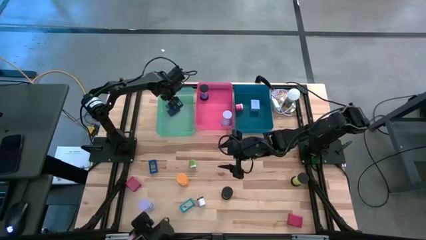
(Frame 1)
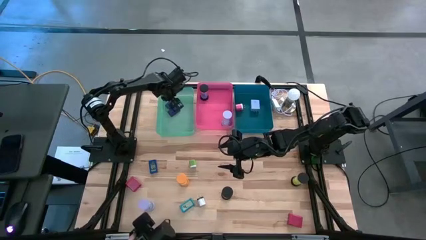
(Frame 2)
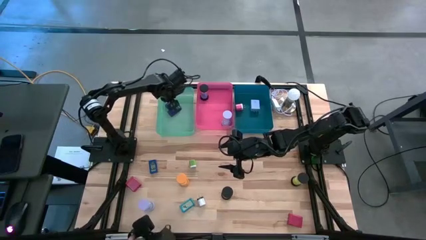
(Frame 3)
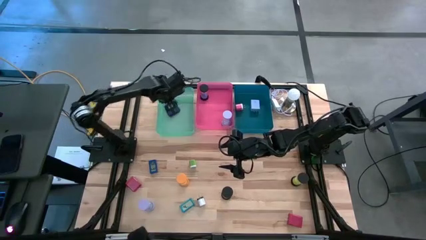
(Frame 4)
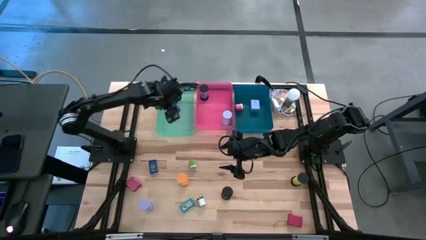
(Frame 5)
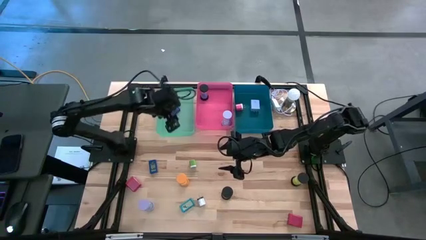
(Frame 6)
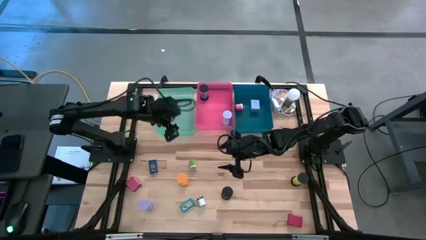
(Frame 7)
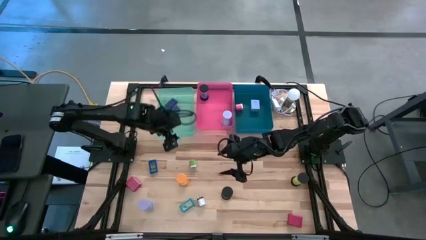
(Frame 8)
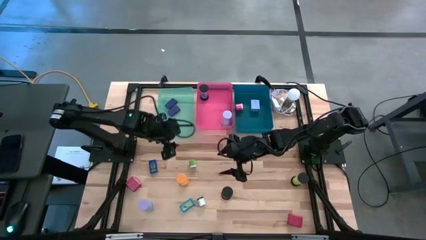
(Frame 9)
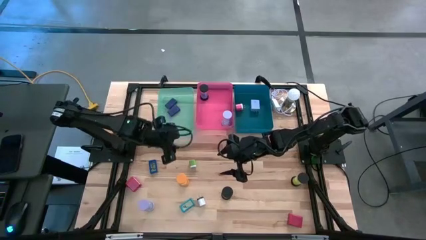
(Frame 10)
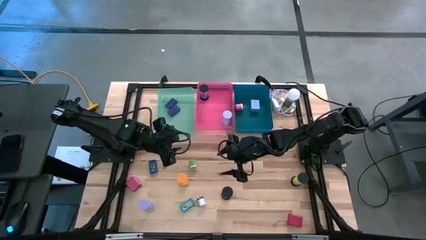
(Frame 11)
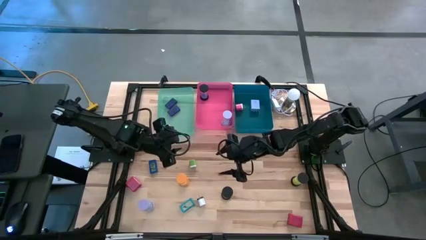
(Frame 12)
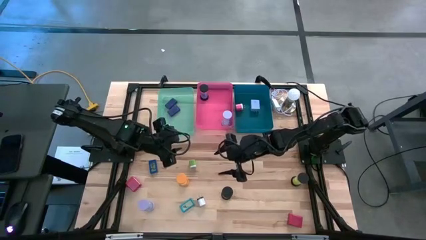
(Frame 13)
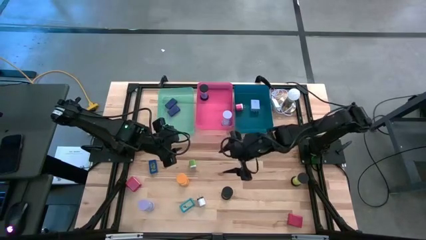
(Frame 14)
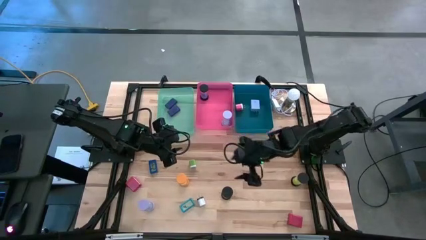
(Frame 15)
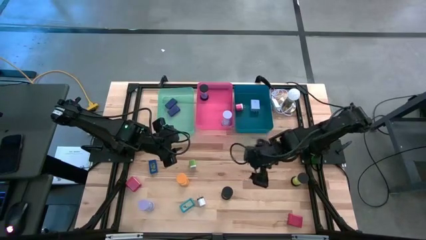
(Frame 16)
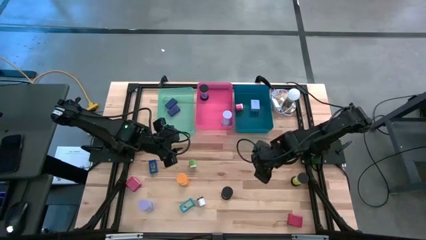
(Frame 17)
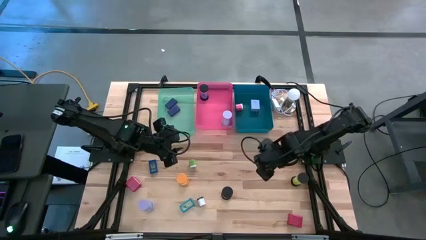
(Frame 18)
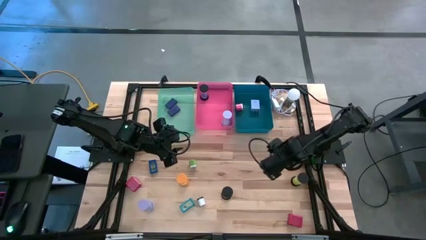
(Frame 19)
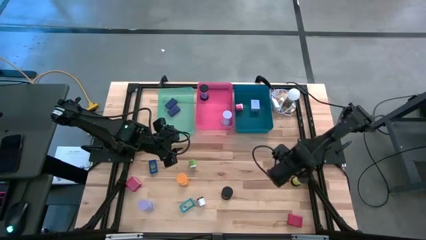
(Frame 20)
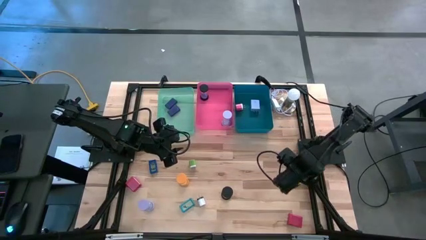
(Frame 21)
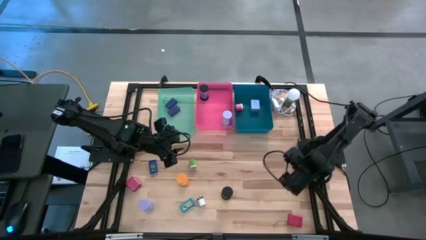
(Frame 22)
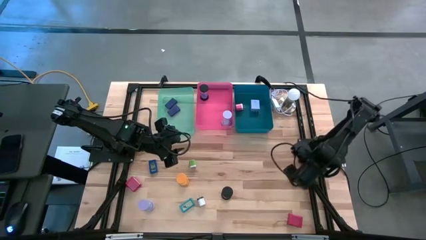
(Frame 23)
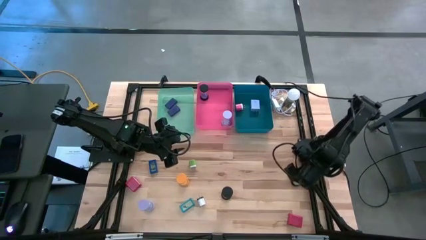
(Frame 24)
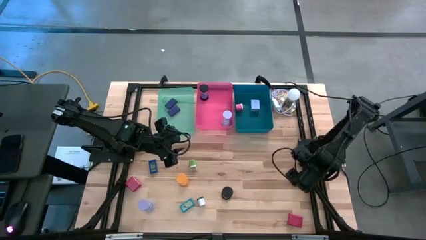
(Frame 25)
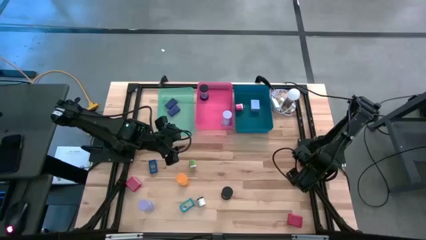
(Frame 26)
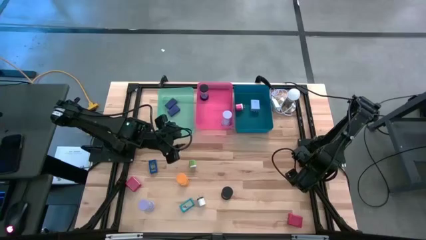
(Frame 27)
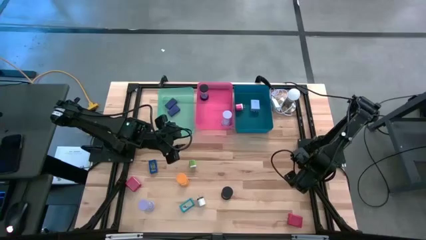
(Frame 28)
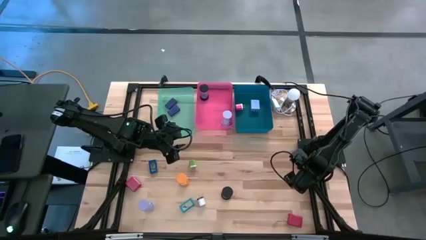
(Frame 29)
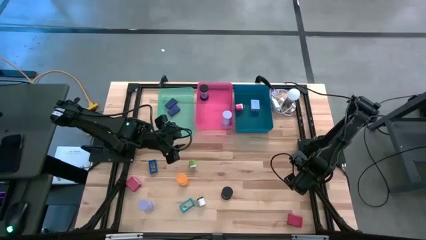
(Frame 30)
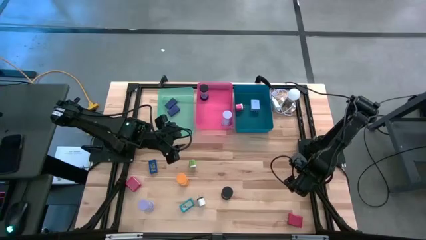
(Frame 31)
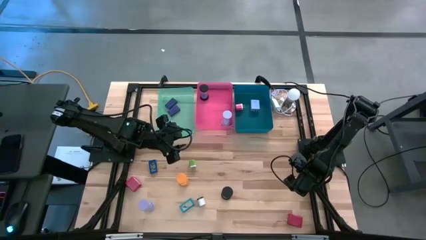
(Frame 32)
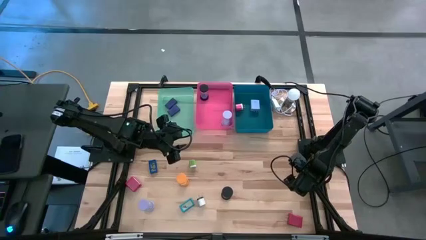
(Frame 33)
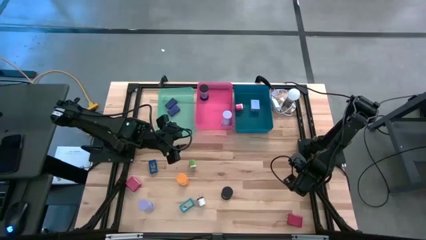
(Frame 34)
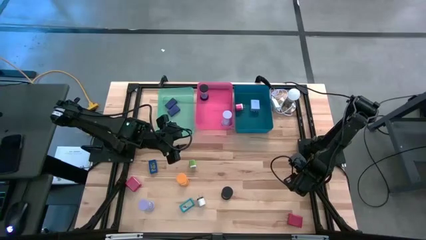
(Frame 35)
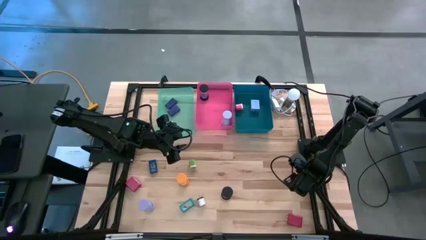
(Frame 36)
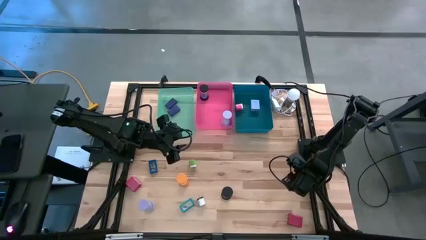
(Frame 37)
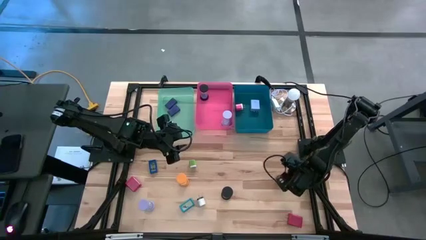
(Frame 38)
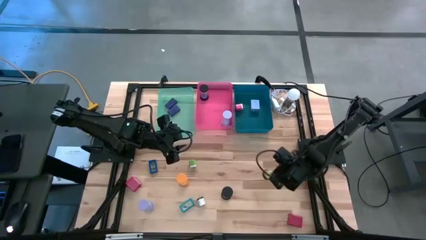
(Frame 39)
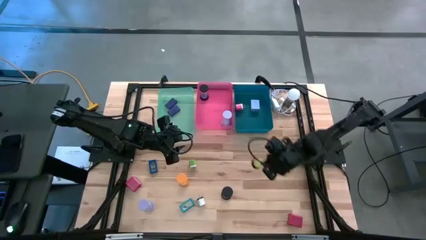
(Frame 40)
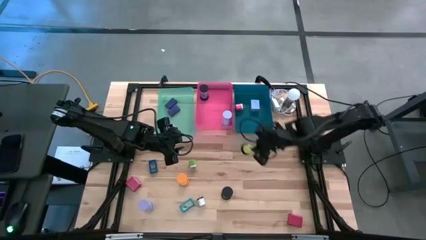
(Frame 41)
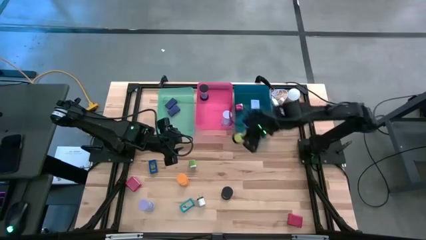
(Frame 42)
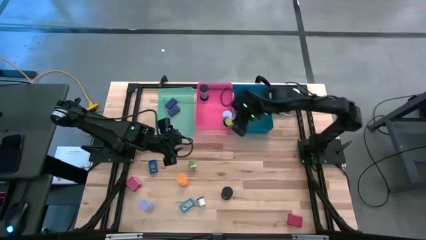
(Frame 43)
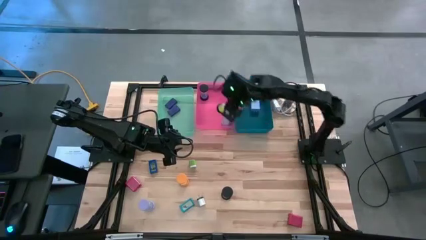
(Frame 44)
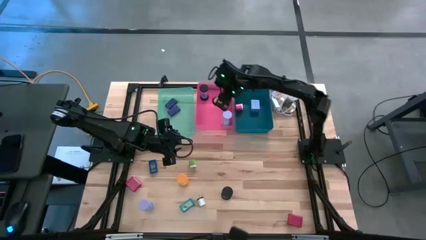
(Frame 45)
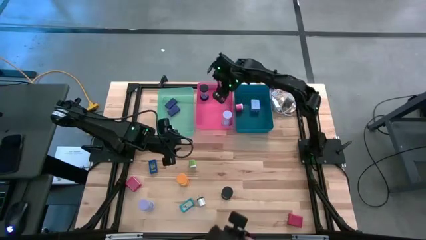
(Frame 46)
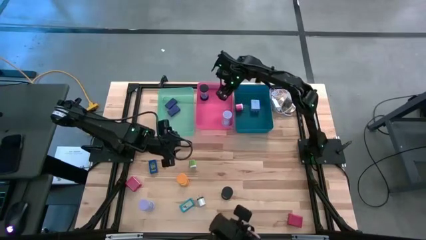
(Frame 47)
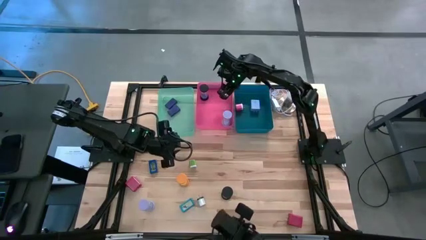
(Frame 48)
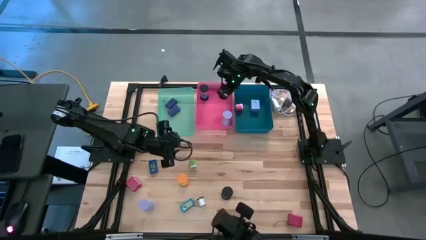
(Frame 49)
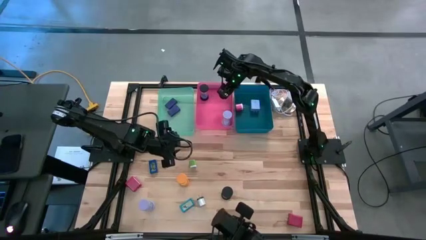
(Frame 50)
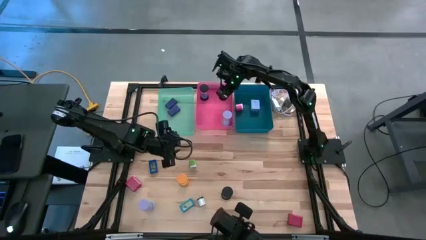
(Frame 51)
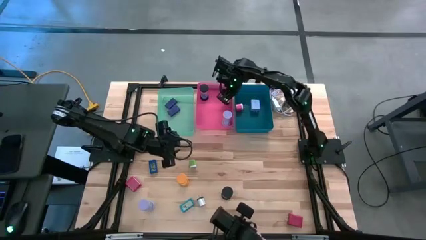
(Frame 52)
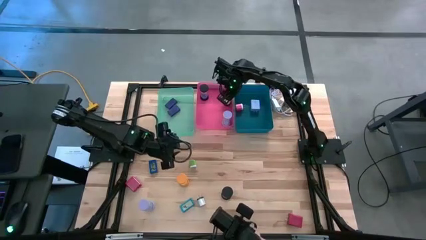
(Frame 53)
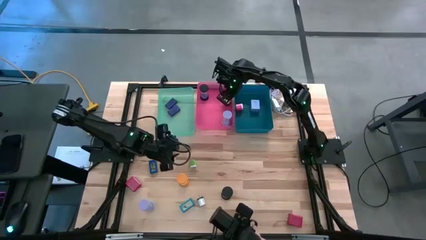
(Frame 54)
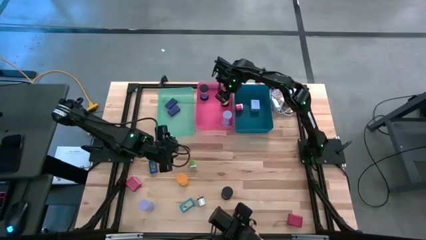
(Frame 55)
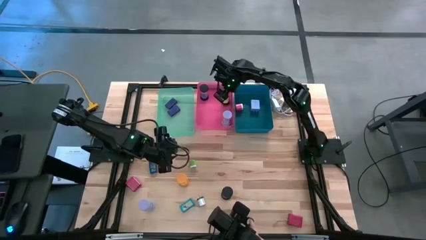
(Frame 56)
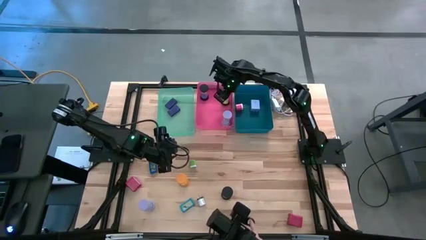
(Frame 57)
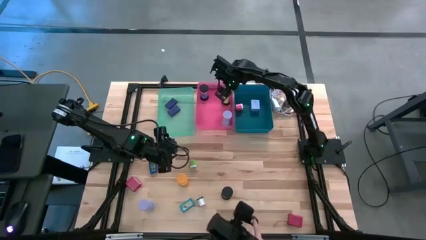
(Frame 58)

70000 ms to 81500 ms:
Task: Pick & Place Office items
Put the green hourglass into the pink bin

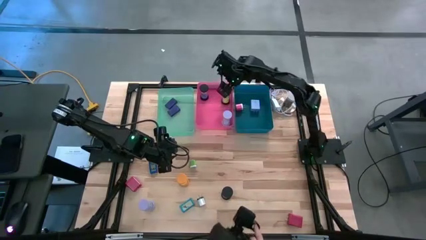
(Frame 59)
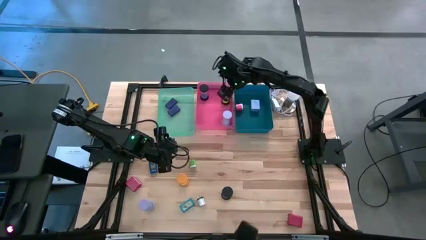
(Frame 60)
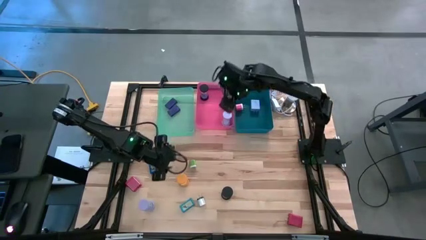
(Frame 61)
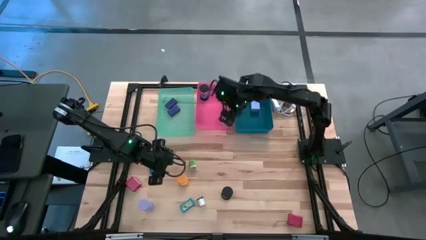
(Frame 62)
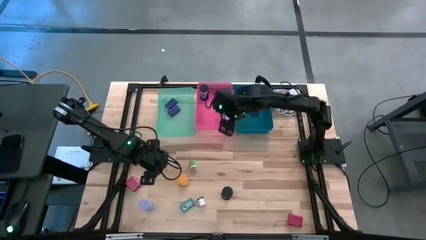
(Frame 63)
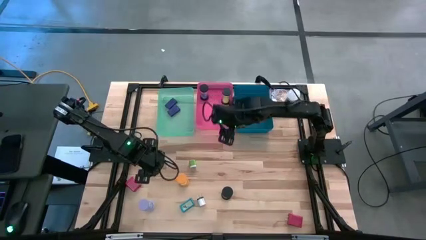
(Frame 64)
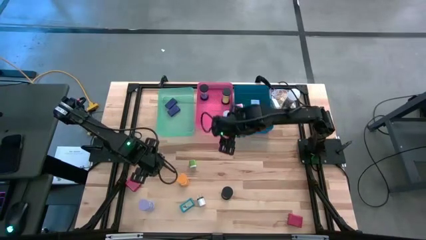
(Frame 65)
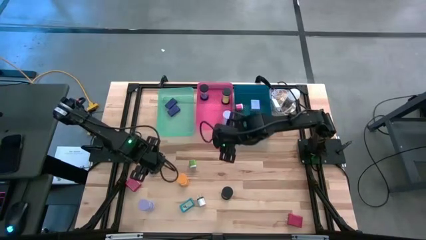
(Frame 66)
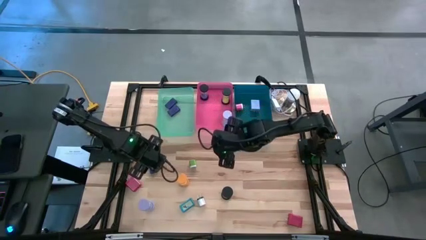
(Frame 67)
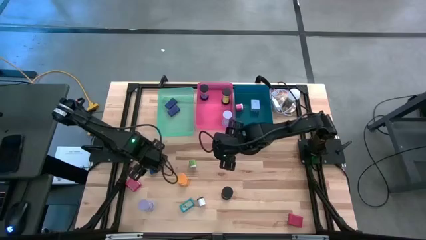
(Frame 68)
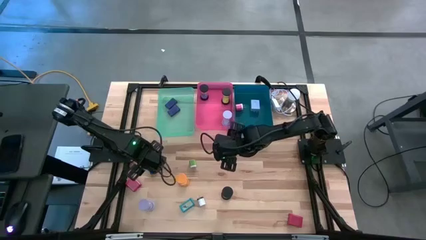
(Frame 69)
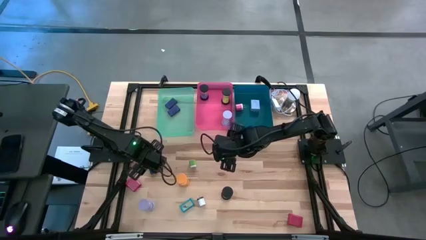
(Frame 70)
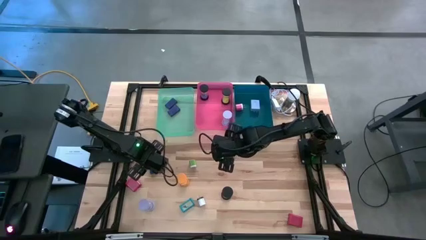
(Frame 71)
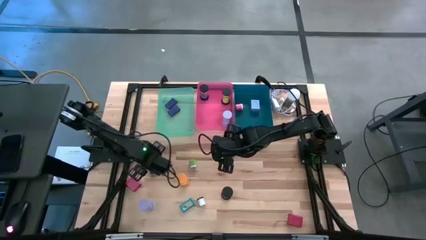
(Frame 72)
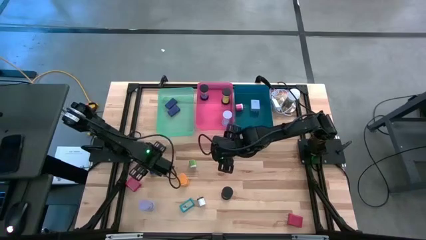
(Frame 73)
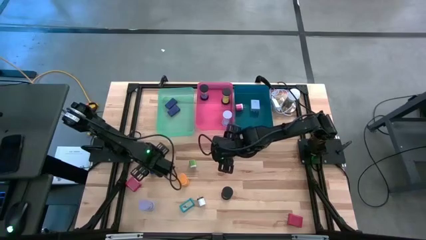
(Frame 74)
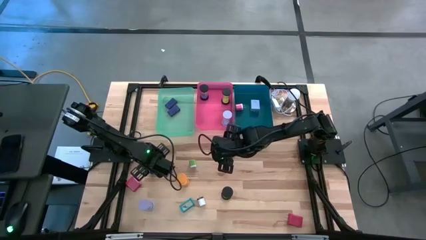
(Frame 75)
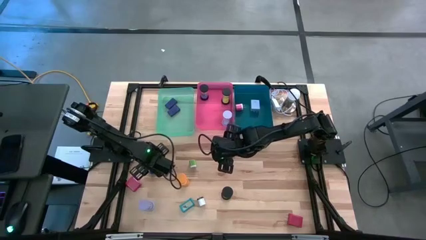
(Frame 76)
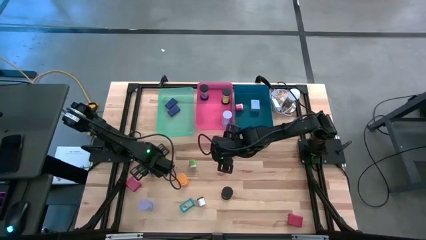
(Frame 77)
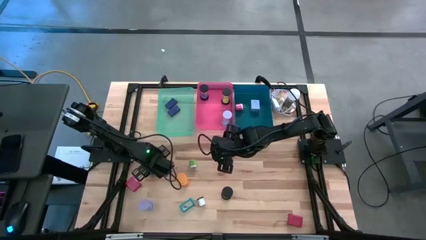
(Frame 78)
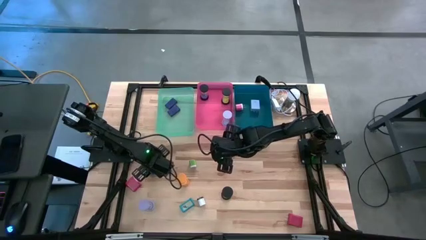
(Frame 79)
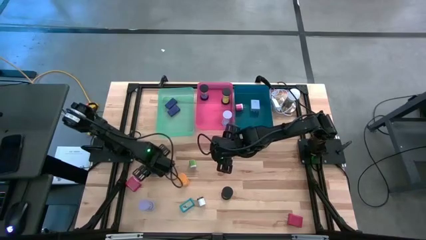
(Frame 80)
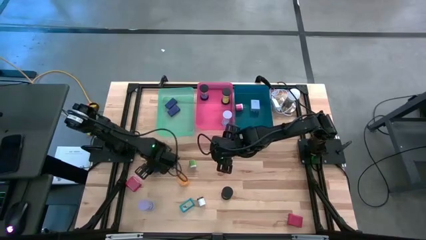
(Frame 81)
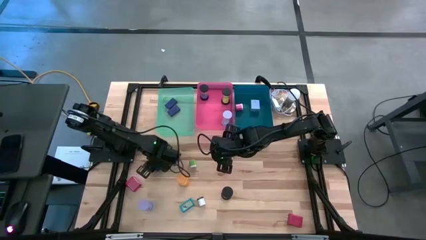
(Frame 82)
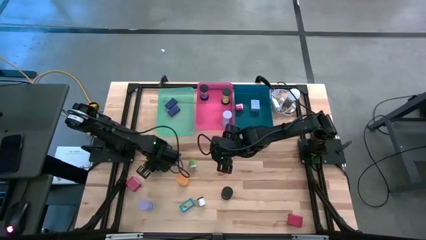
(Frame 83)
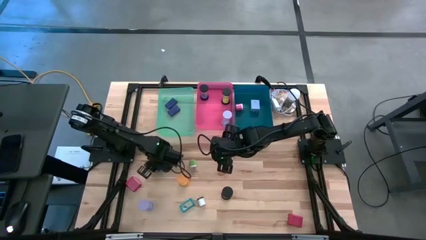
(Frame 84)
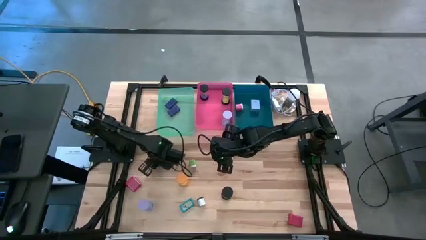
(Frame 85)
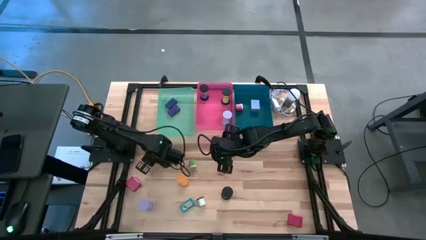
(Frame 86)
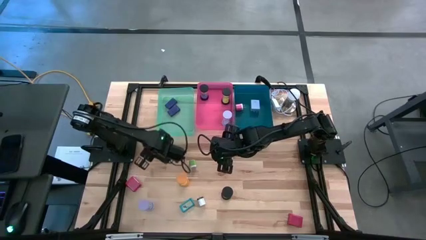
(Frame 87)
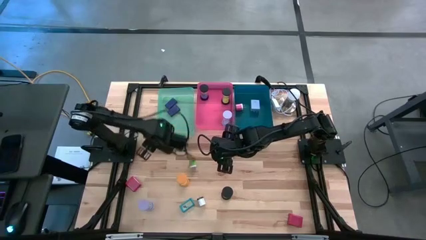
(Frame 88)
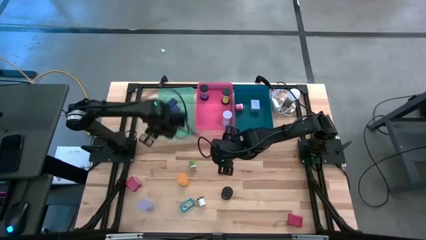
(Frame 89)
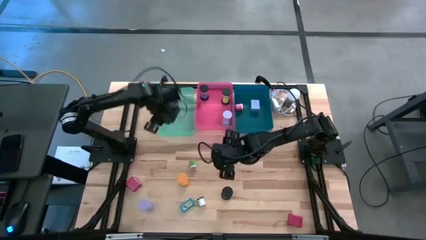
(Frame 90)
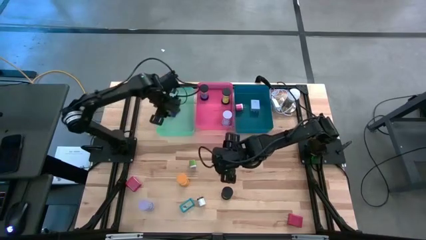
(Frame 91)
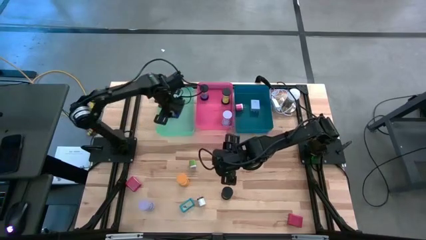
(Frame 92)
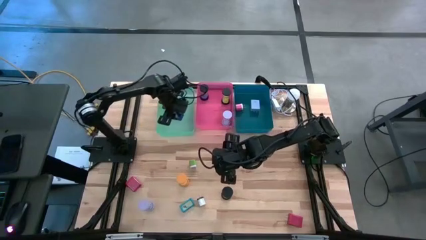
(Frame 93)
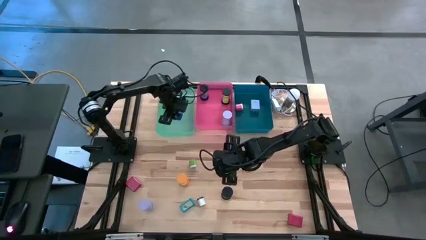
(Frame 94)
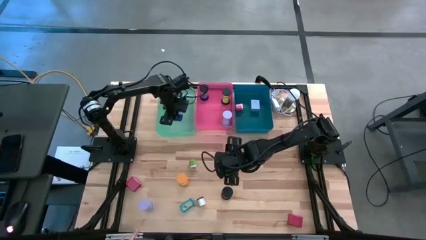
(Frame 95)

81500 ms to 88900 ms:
Put the blue digital clock into the green bin
